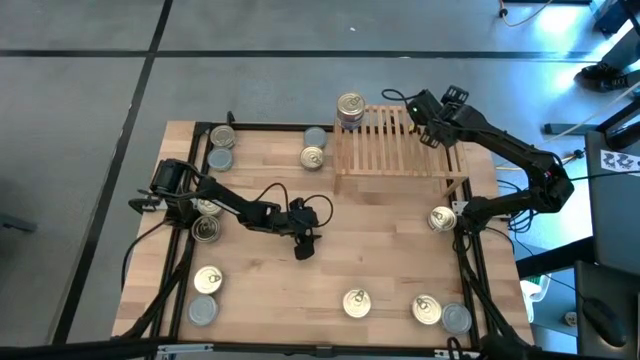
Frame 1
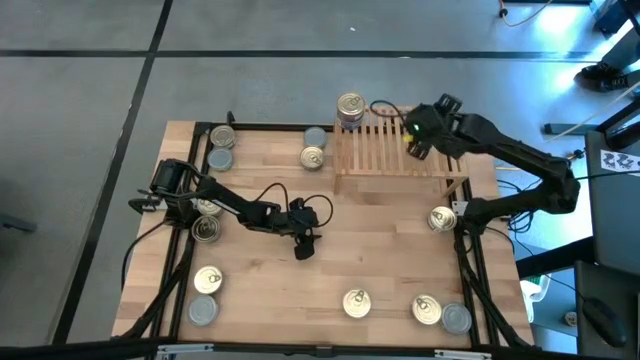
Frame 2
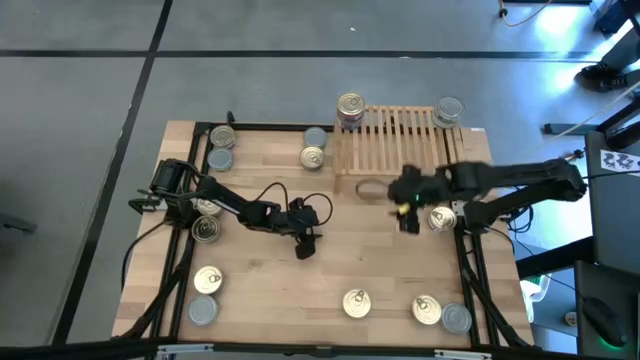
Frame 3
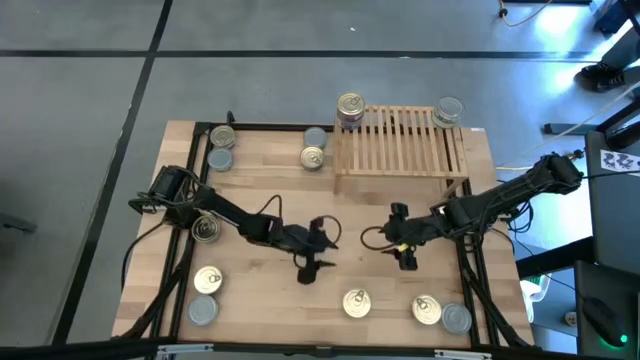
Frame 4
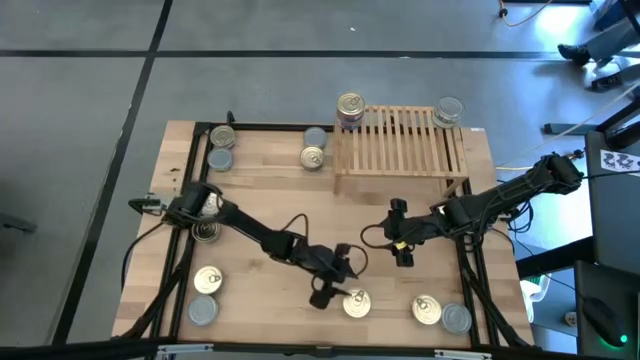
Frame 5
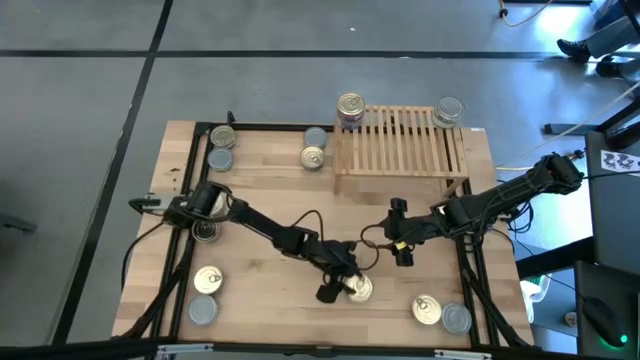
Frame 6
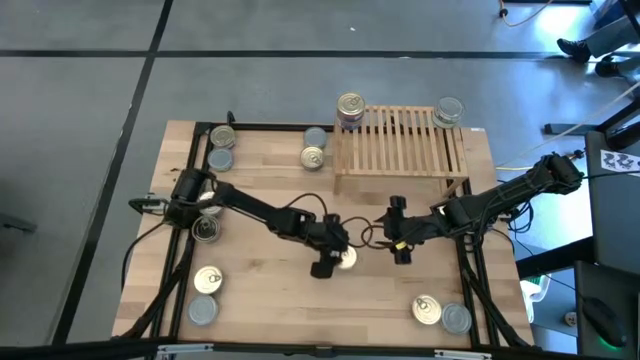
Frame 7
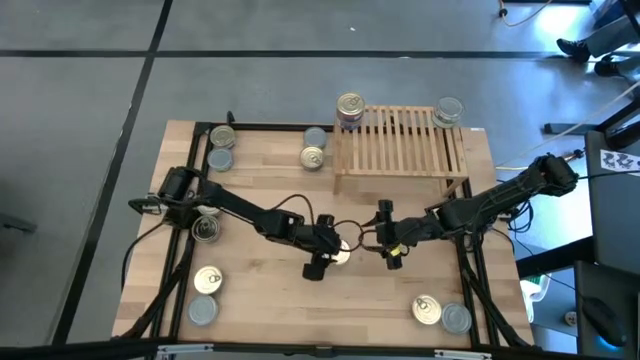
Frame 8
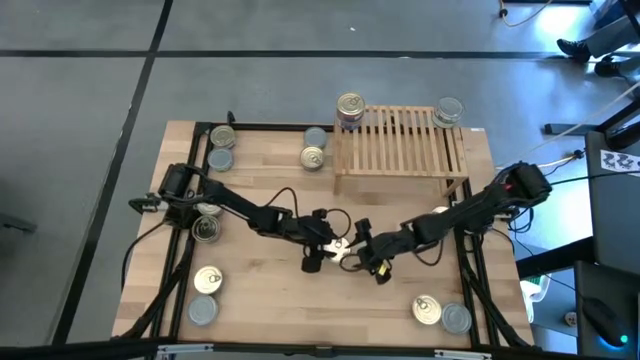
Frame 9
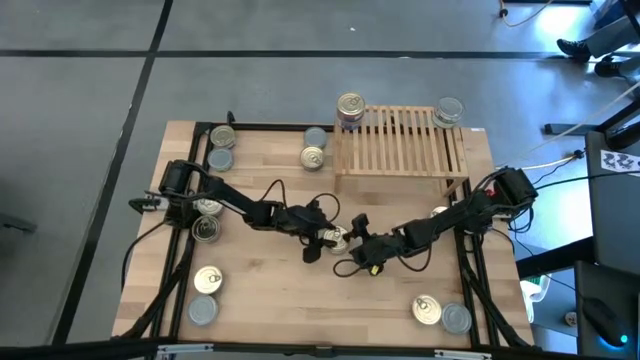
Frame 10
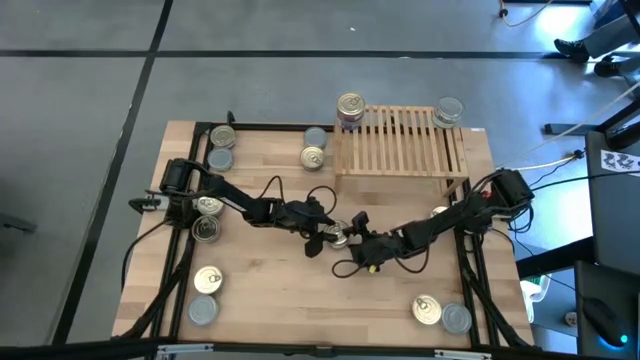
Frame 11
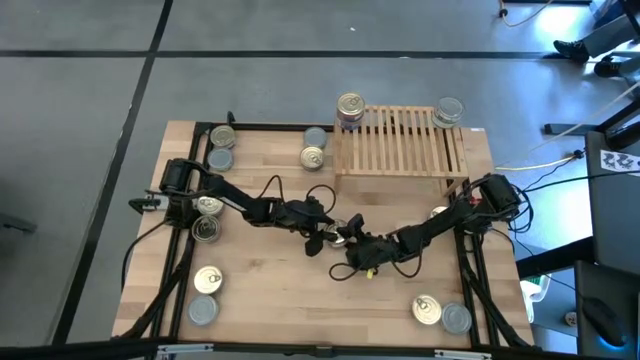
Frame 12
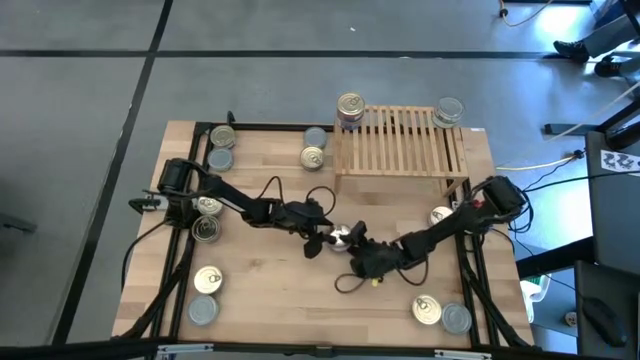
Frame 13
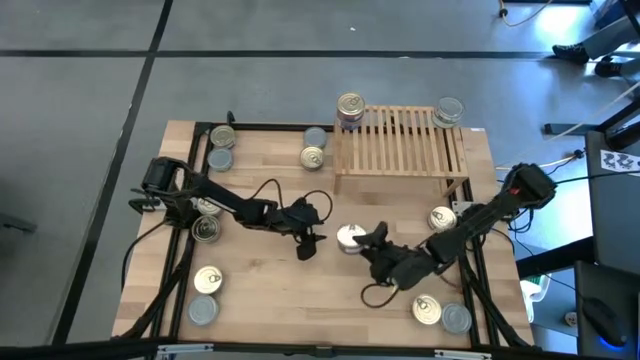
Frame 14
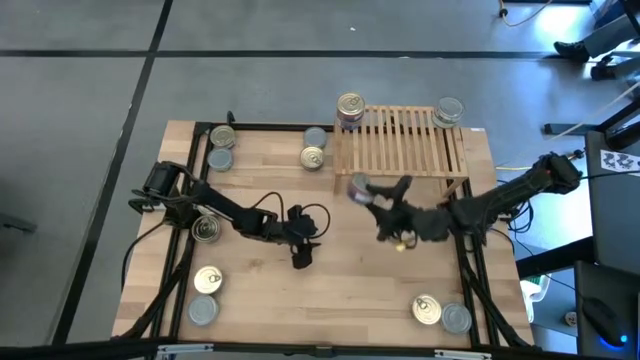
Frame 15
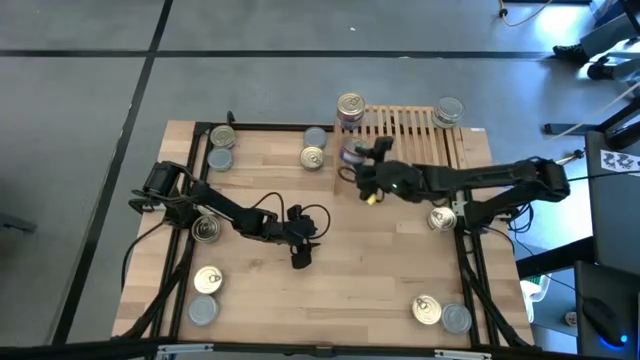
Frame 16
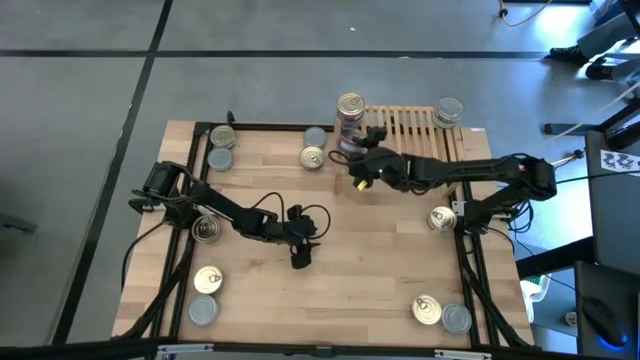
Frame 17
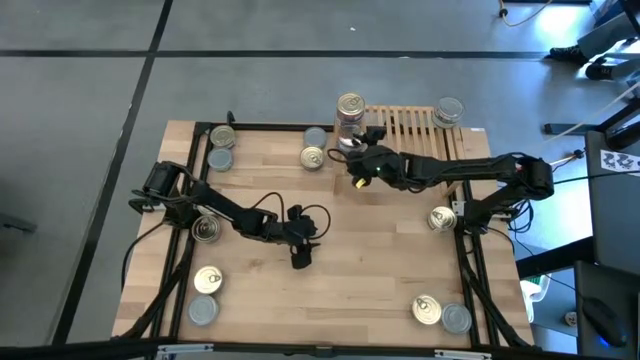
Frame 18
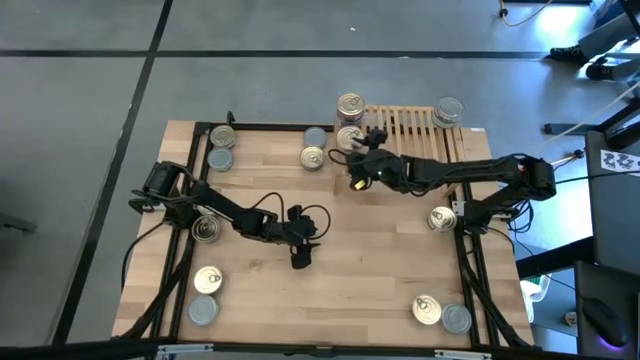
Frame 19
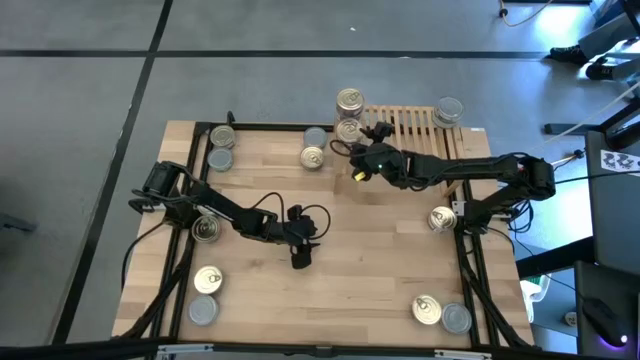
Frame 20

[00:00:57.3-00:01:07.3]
Task: Stack canned seafood by type on shelf
Put the blue and pink tuna can on the shelf and align it to the other blue and pink tuna can

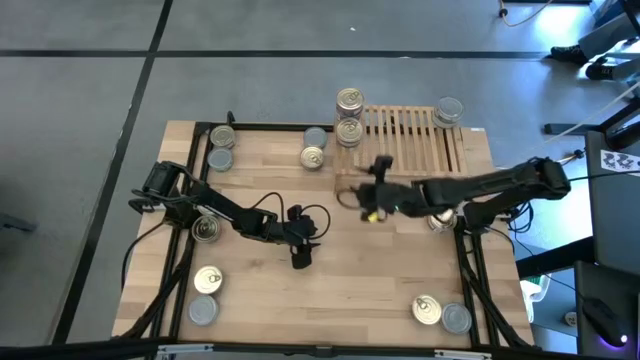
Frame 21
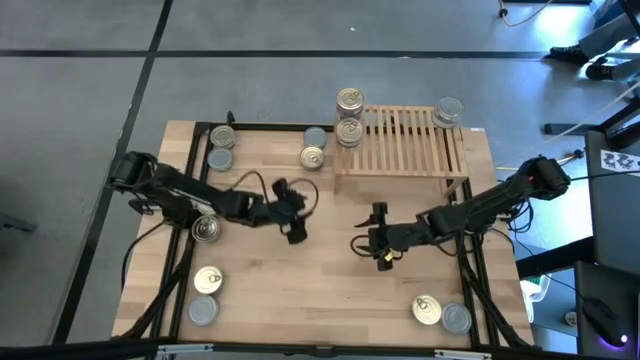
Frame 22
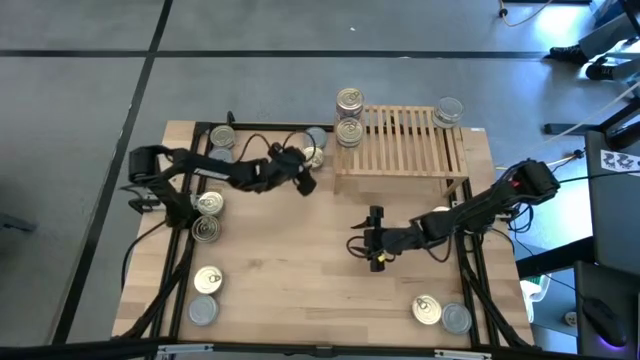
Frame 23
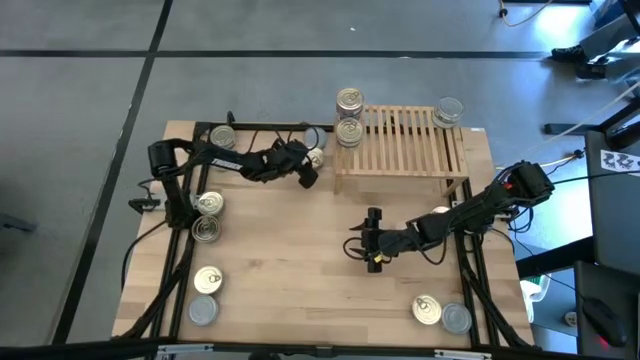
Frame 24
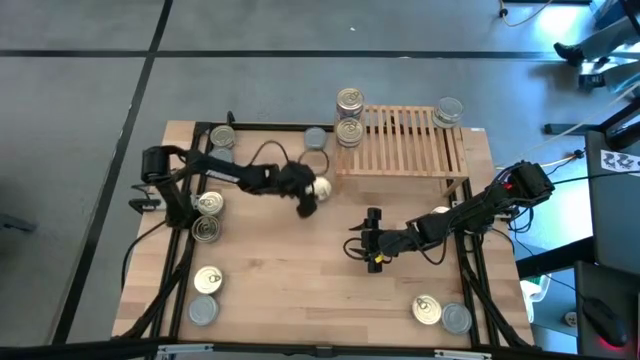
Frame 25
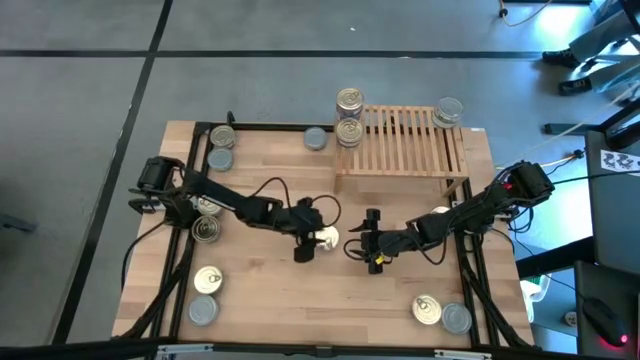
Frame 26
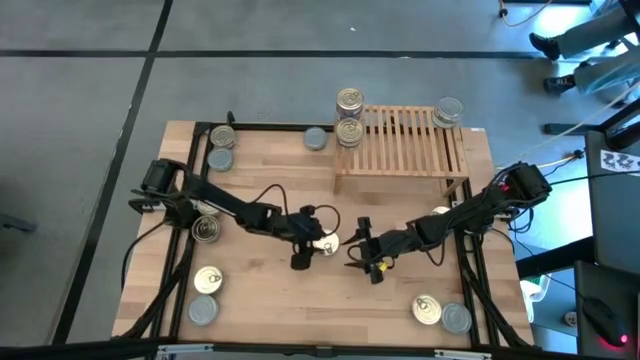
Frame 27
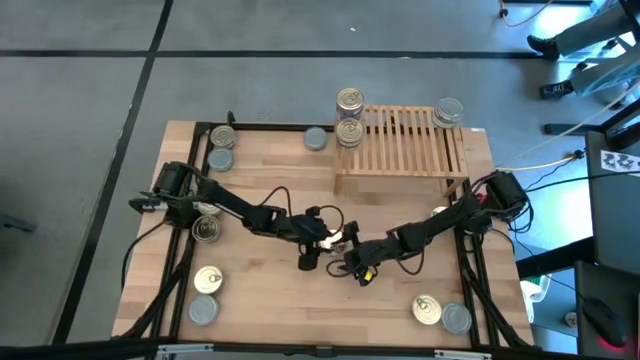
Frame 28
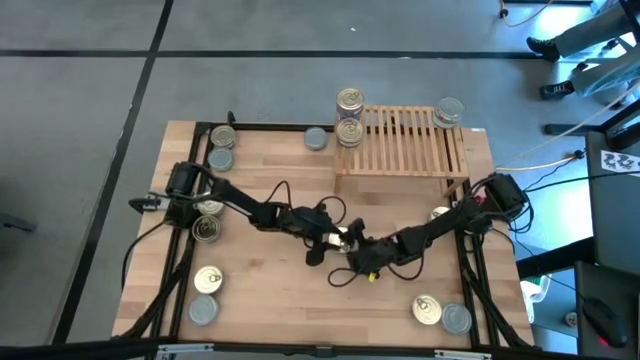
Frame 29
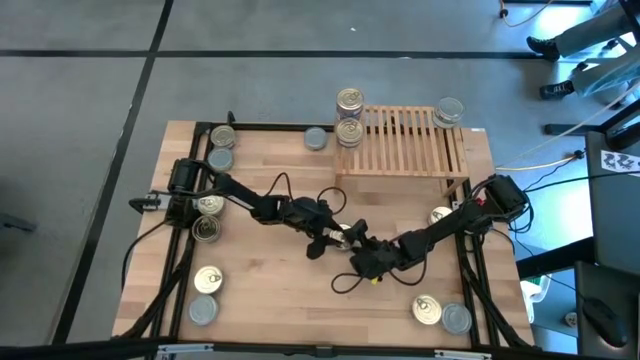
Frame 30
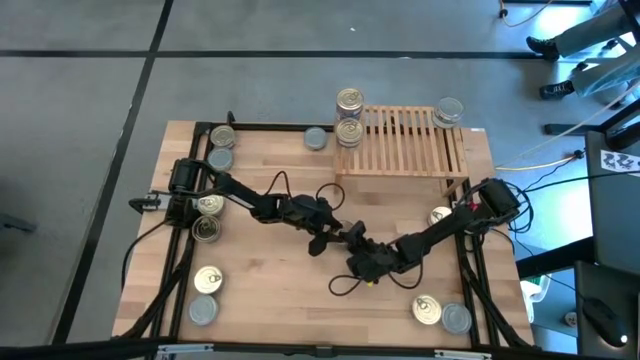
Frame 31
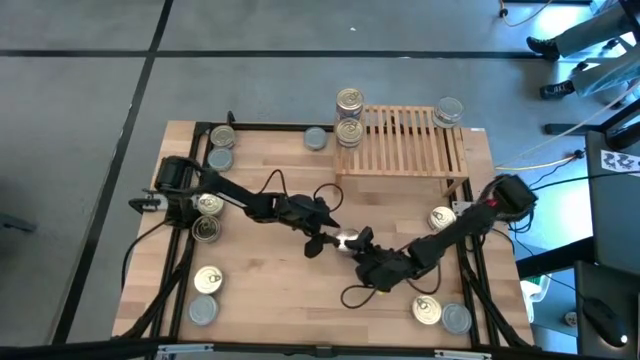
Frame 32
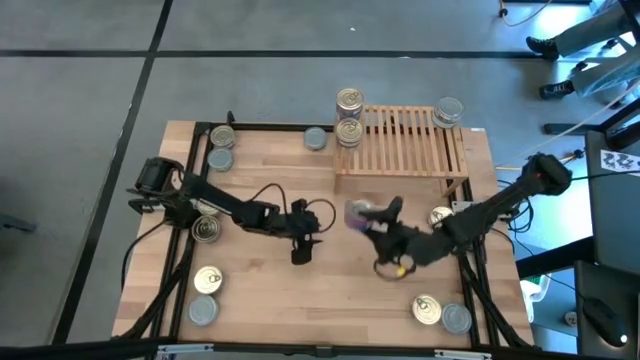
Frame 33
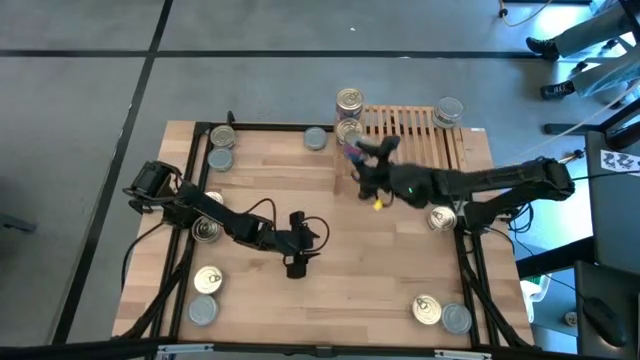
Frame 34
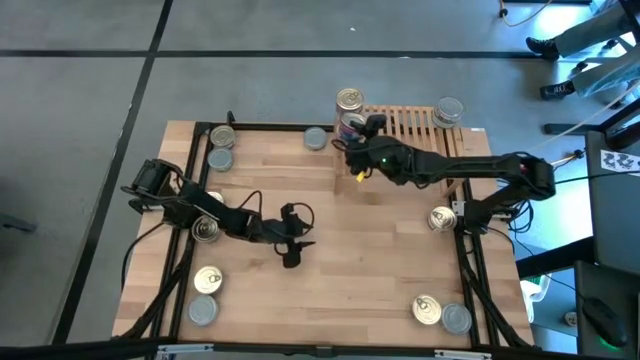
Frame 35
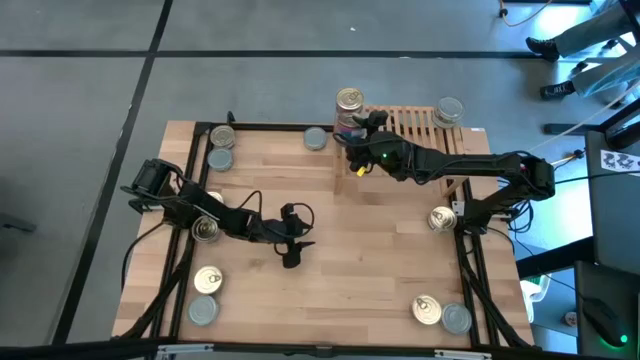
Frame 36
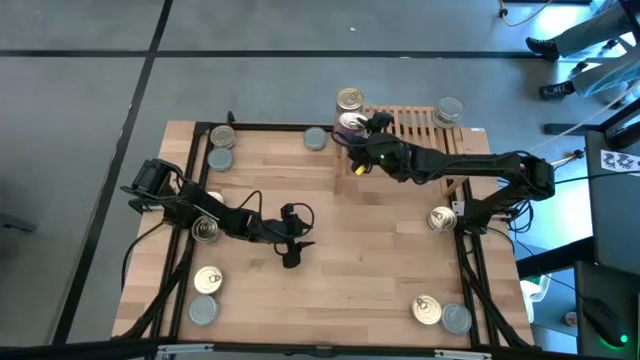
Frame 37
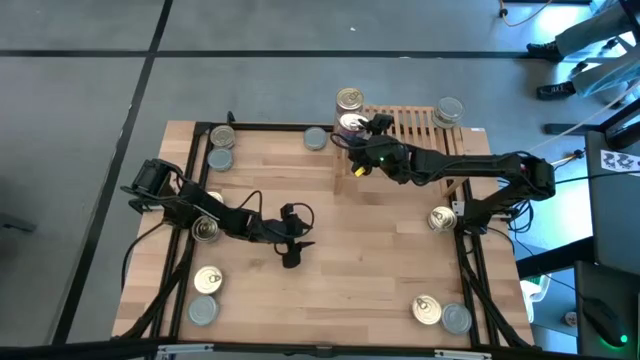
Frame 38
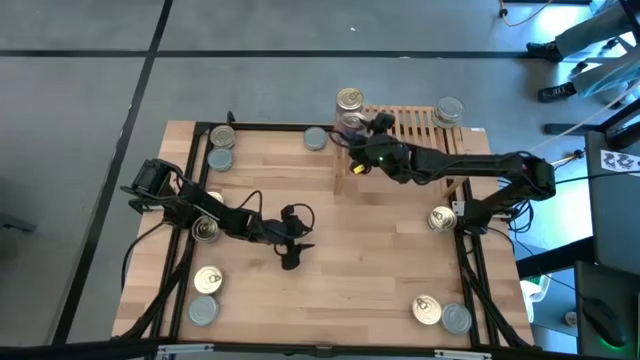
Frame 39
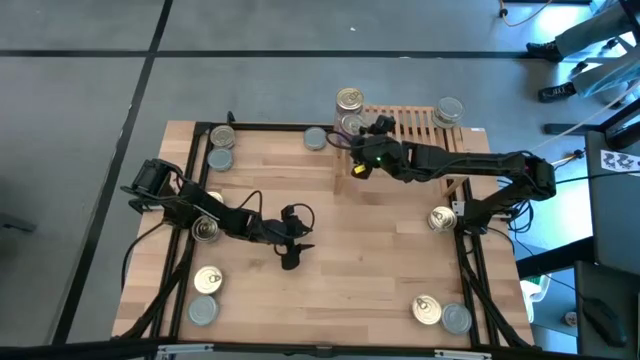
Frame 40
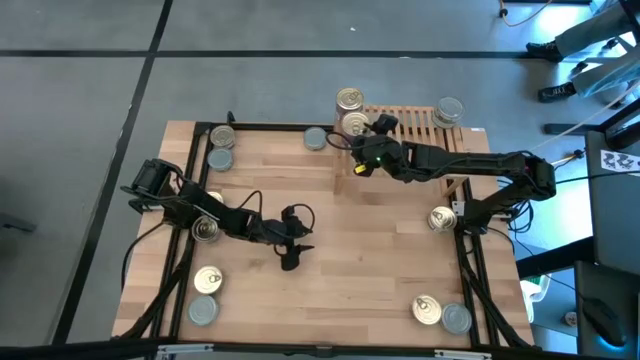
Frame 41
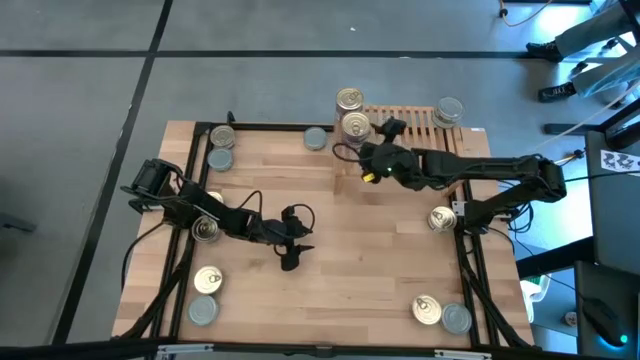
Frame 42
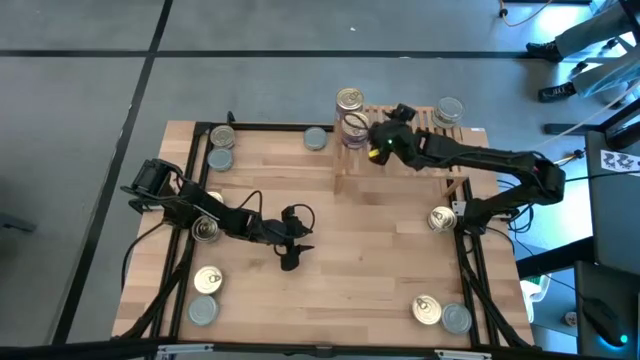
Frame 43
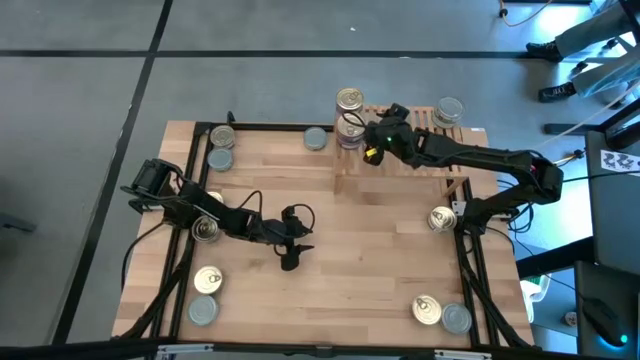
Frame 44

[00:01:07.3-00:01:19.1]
Stack the blue-pink tuna can on top of the blue-pink tuna can on the shelf
